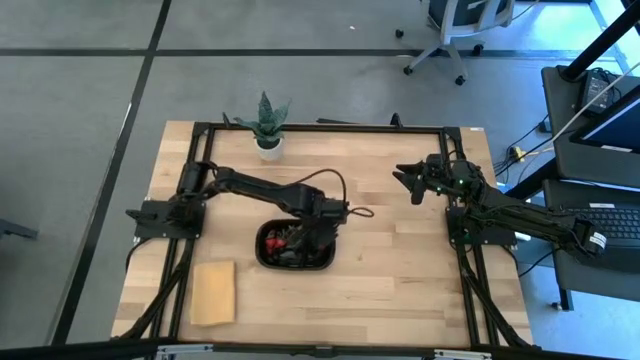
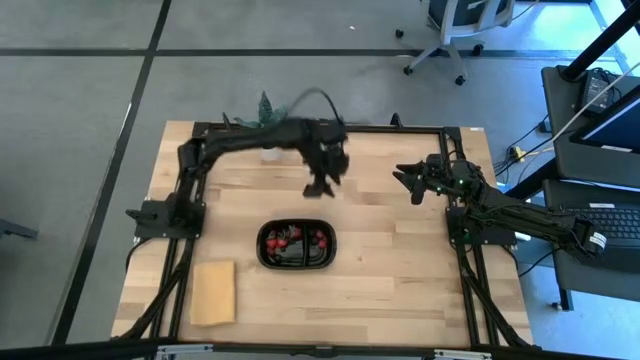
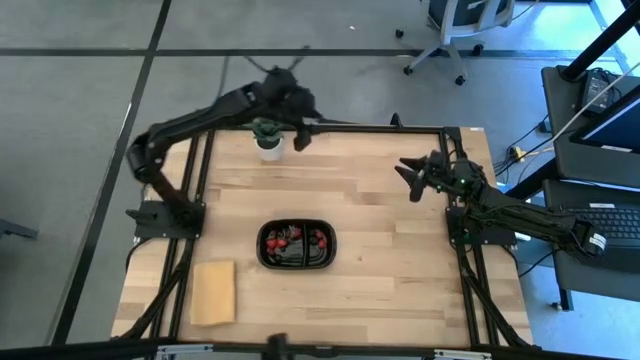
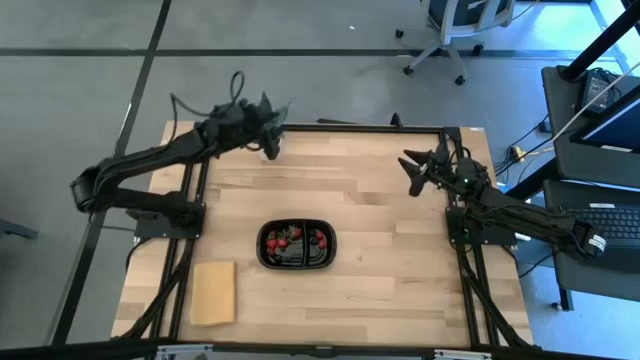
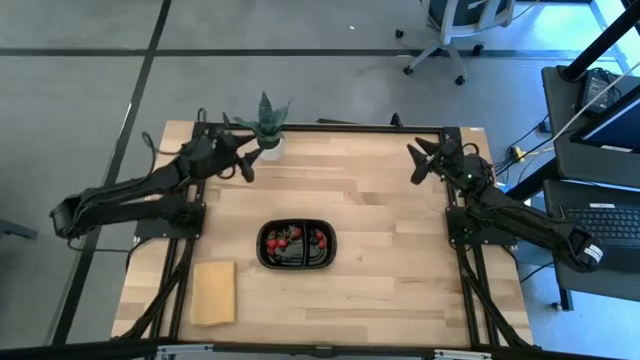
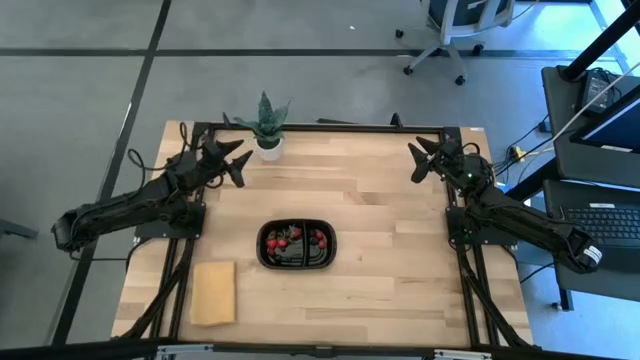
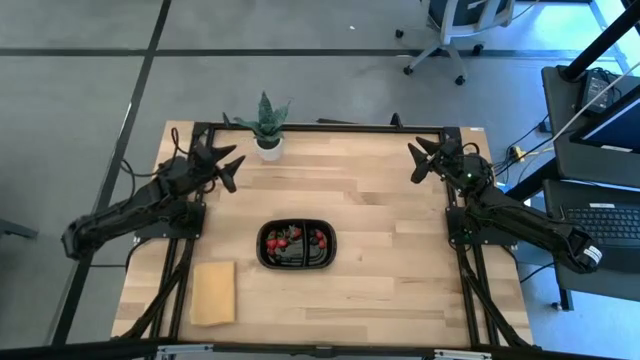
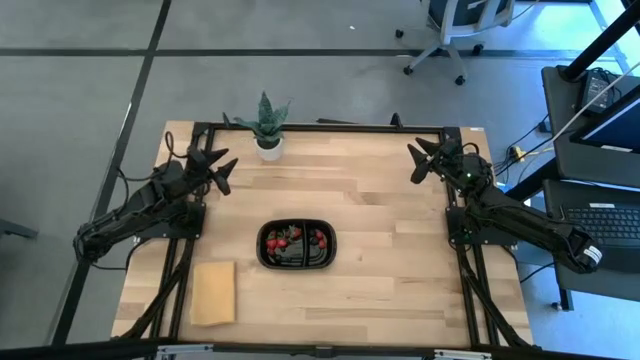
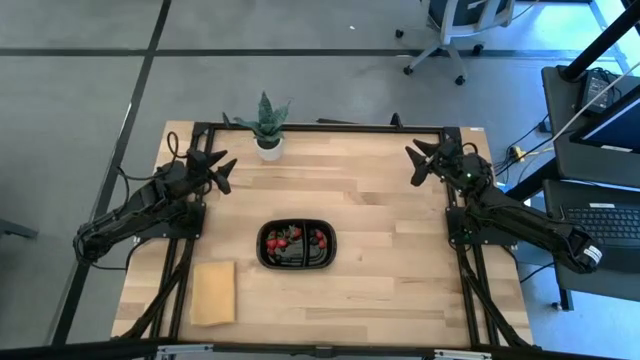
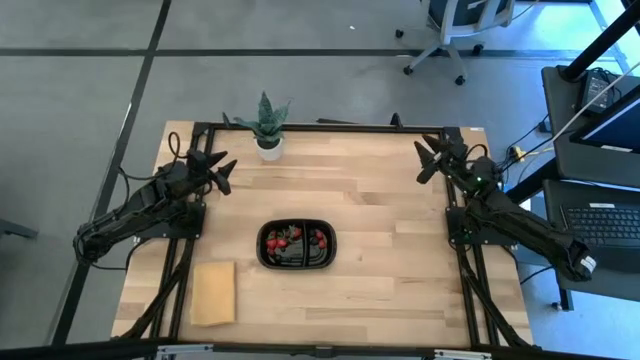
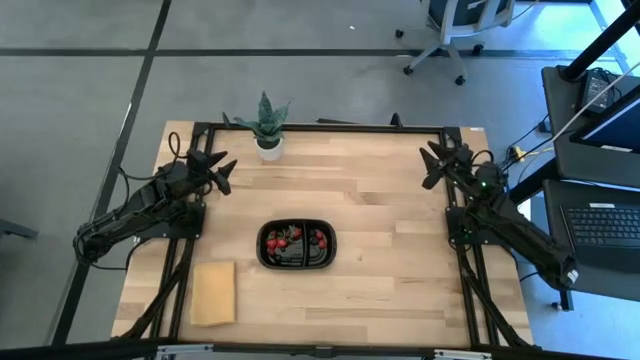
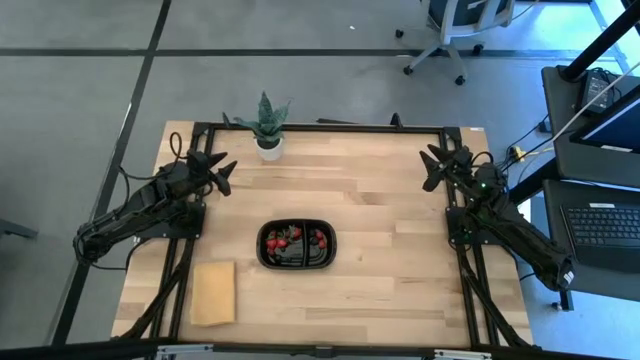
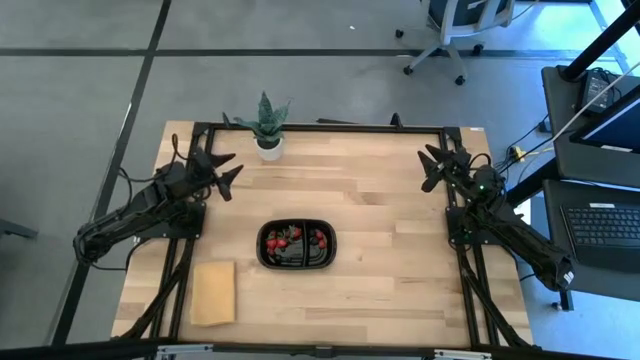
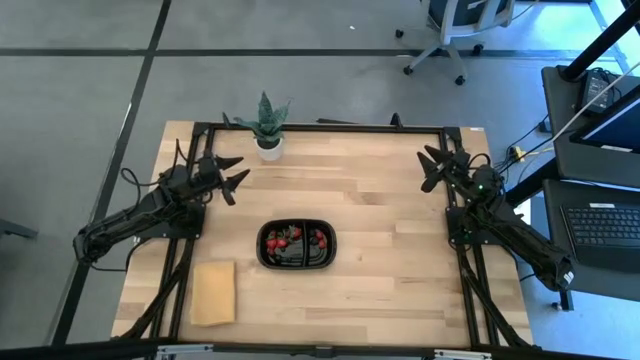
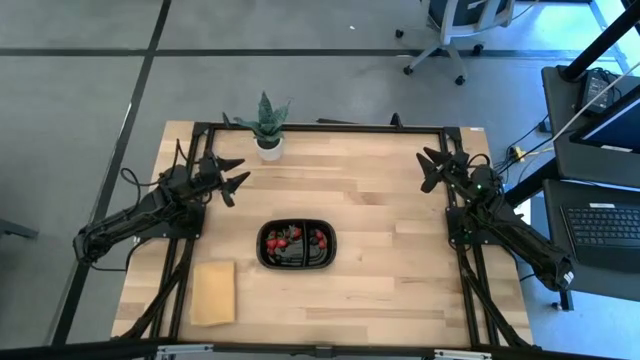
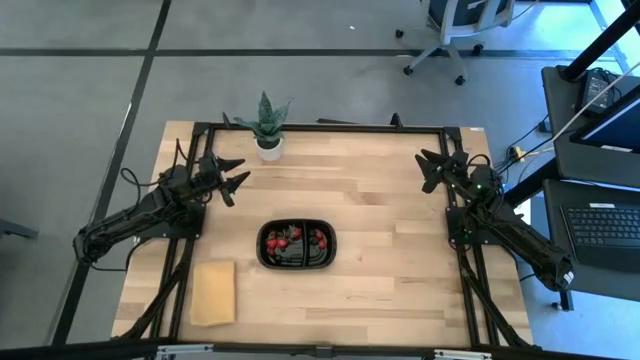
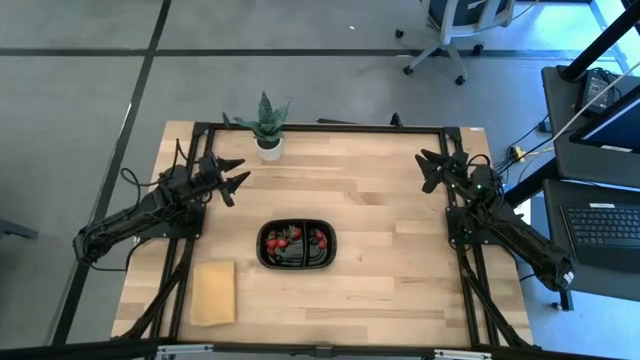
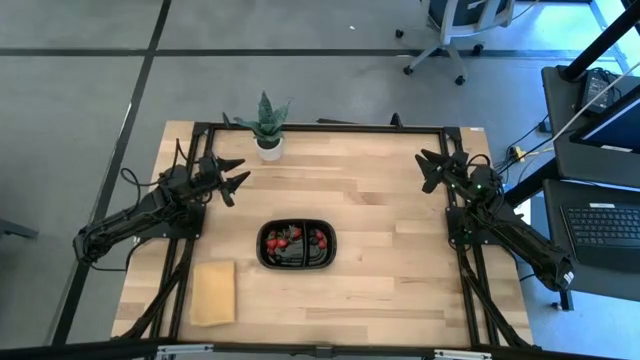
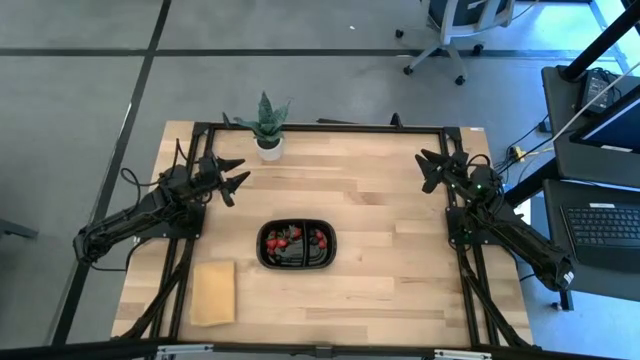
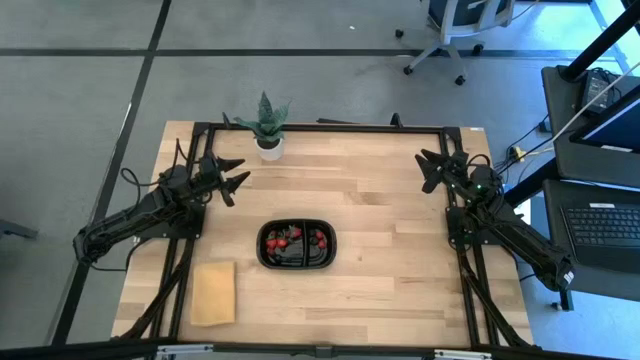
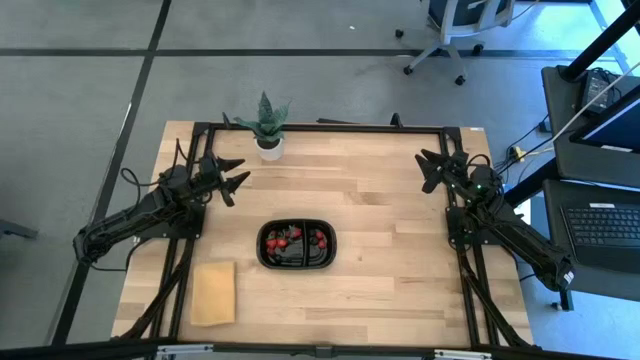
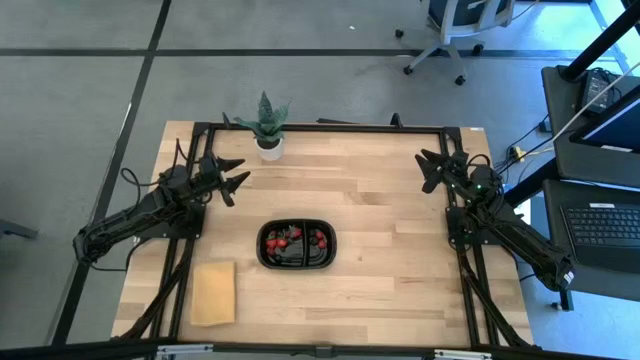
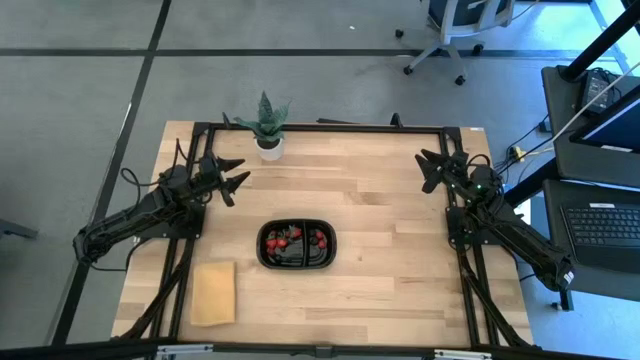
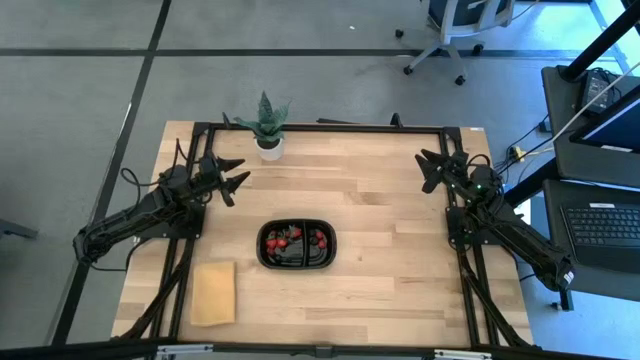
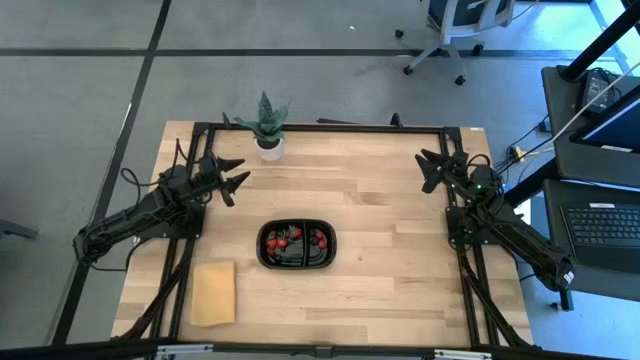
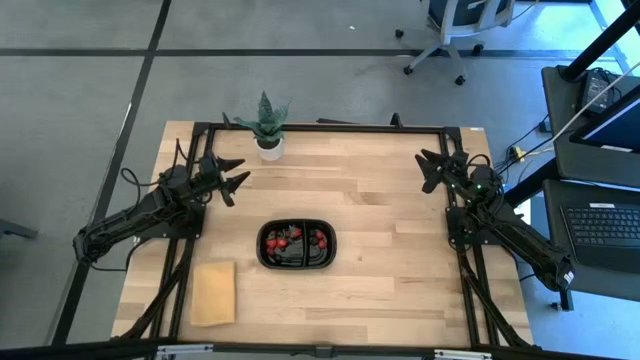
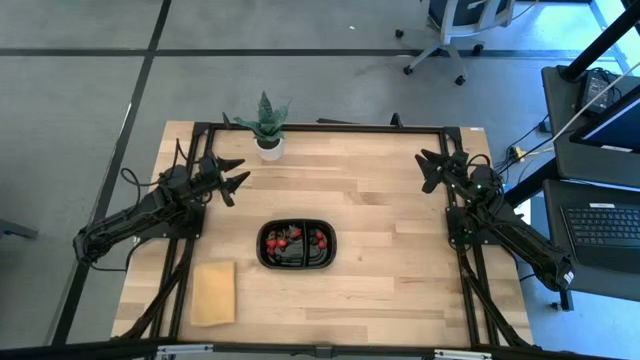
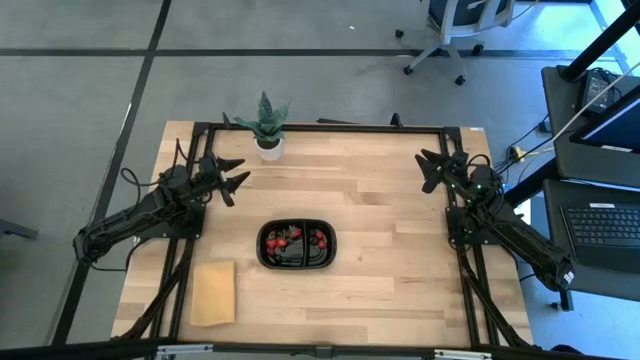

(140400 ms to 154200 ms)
Task: Pick and placing Produce into tupperware
Return to Home Position

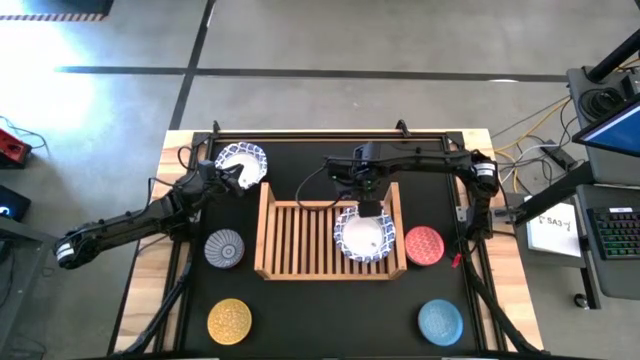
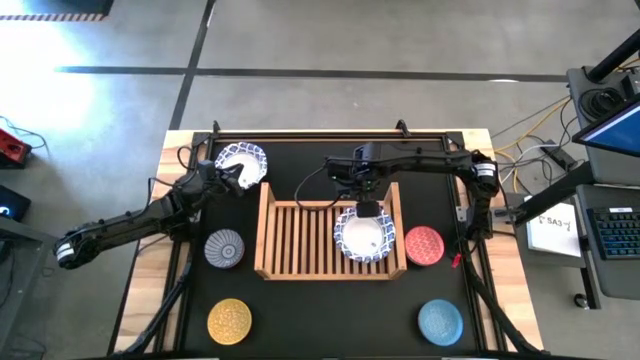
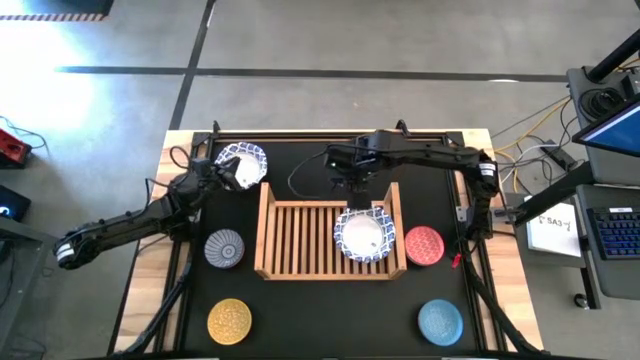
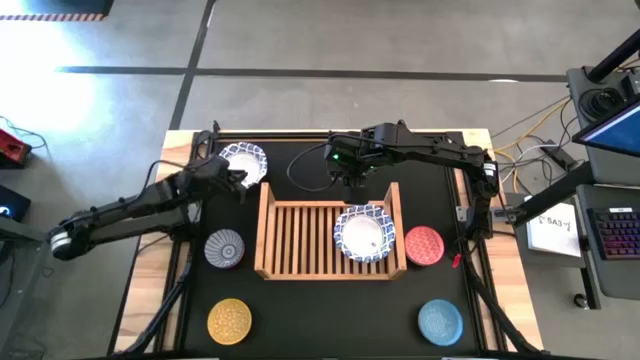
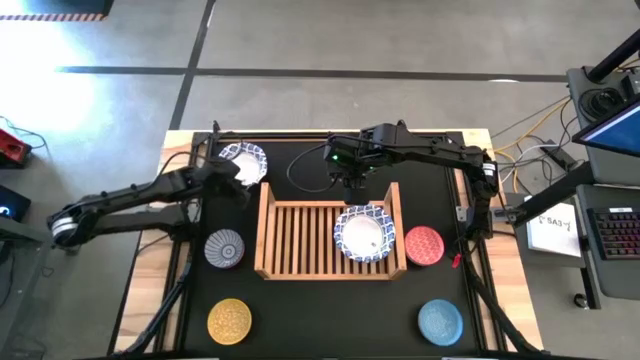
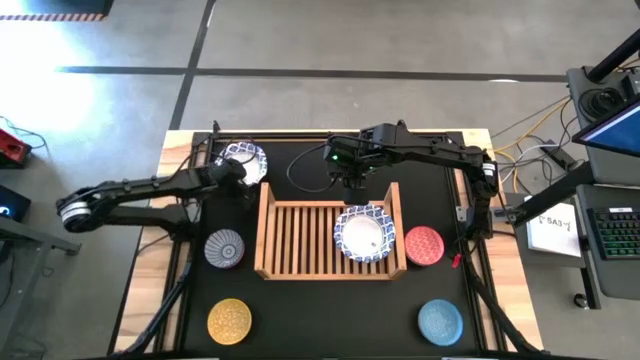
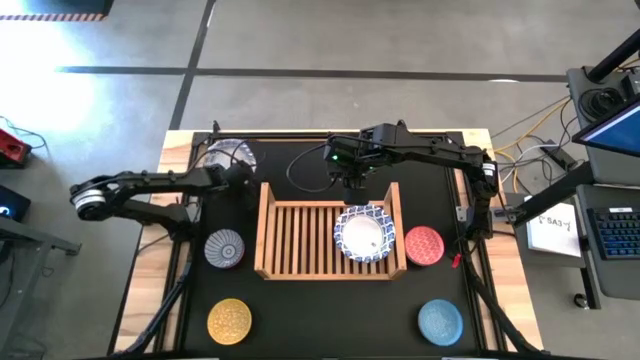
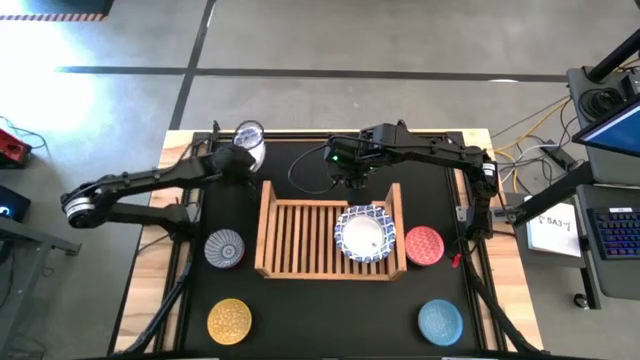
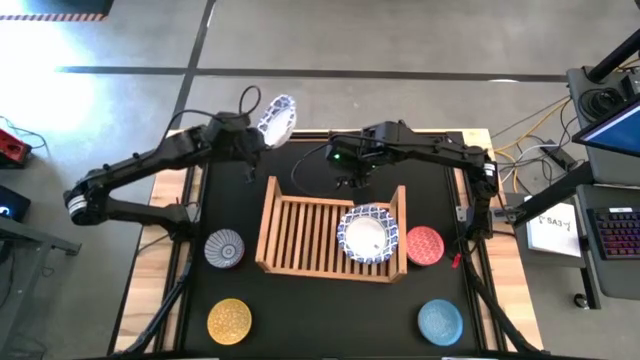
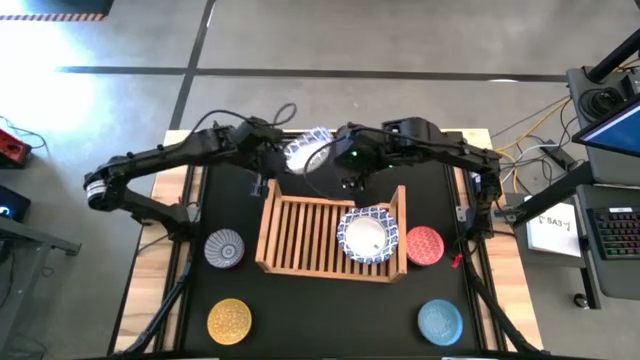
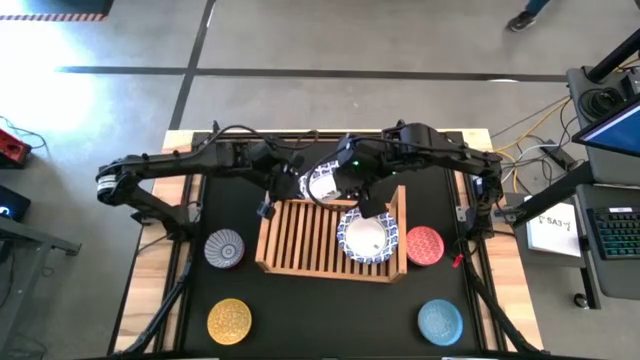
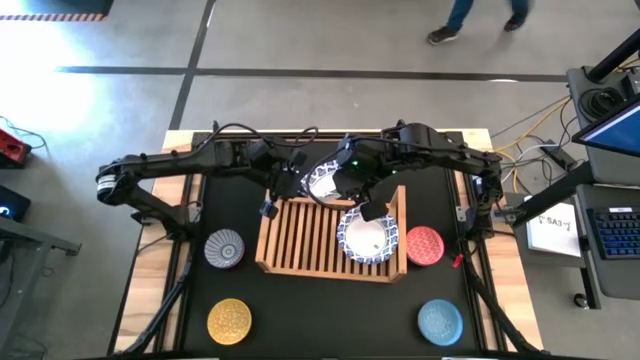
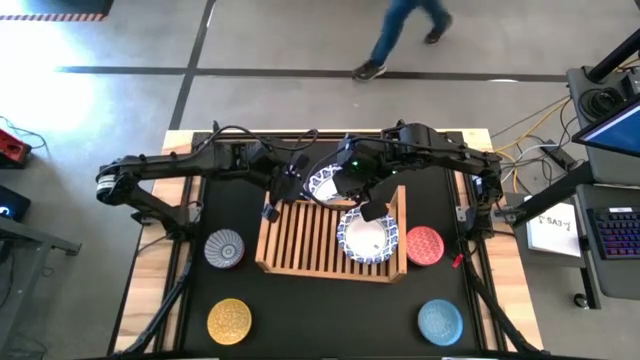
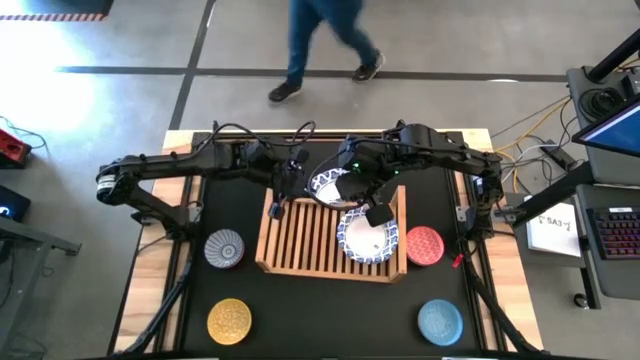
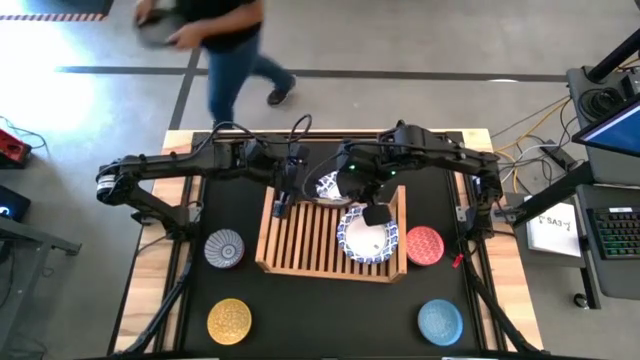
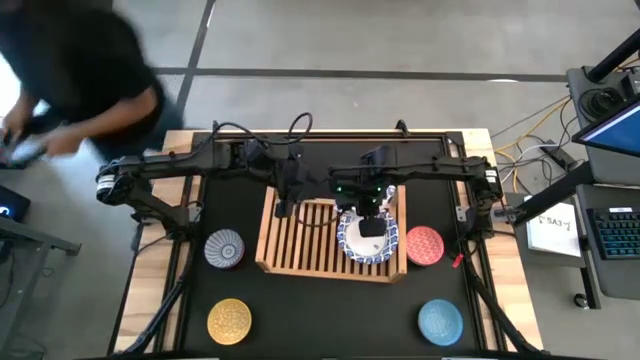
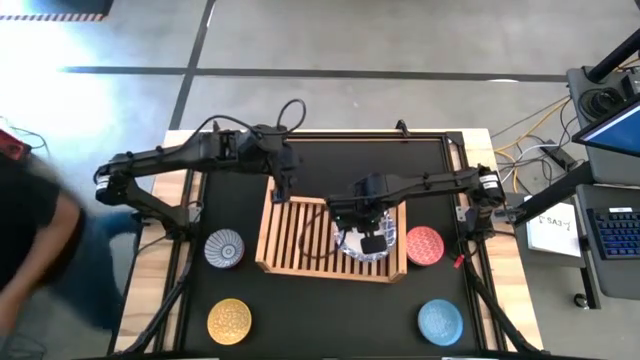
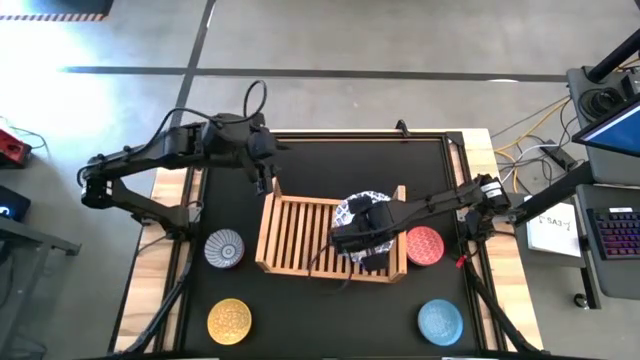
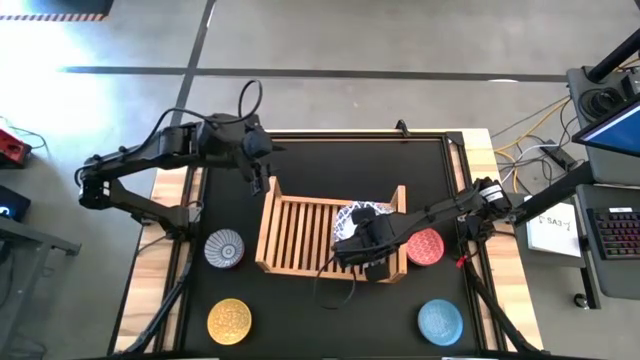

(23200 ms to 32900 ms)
Task: Place and stack bowls onto a shelf
Stack the white bowl on top of the other white bowls on the shelf
